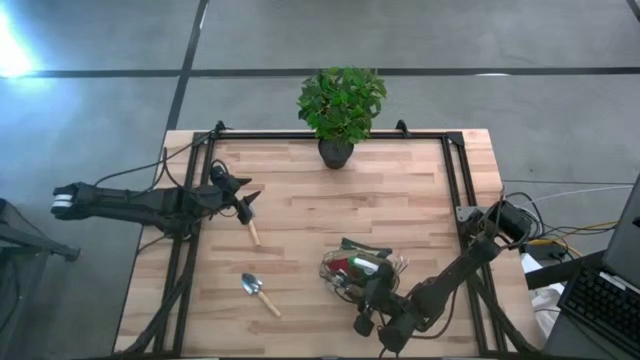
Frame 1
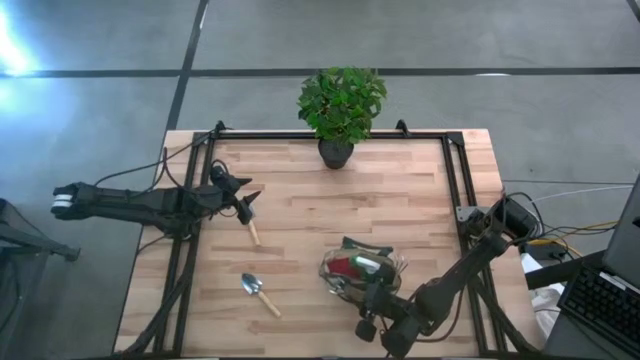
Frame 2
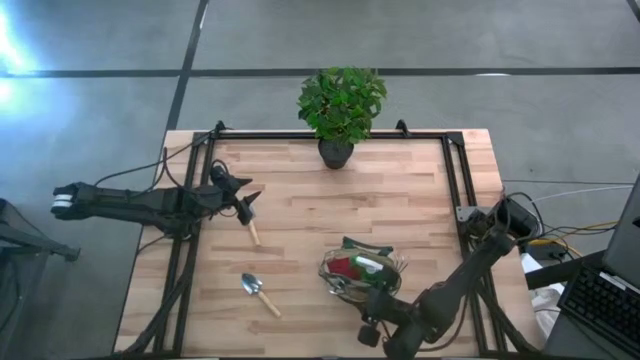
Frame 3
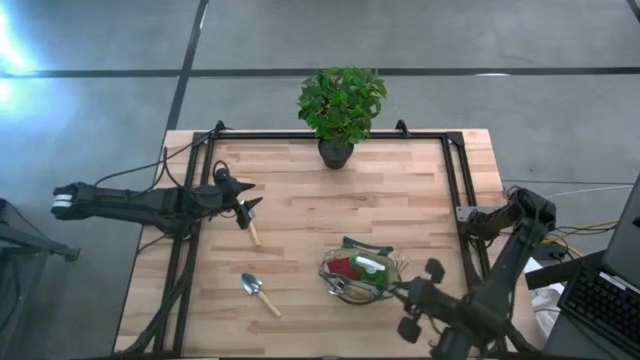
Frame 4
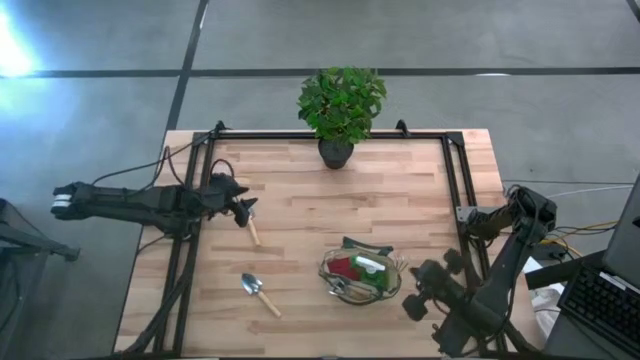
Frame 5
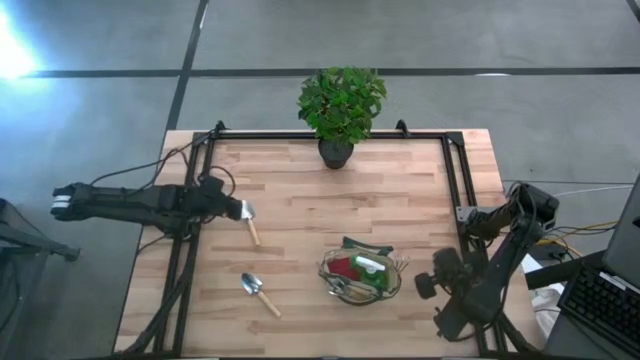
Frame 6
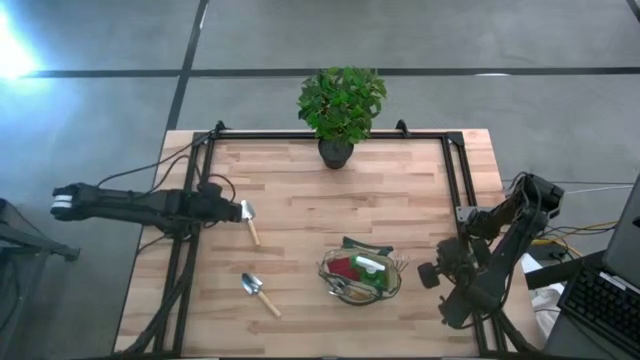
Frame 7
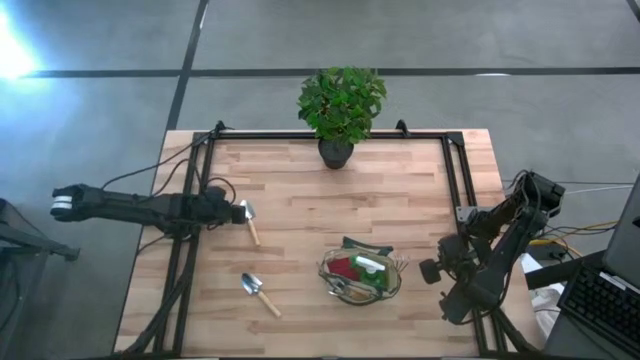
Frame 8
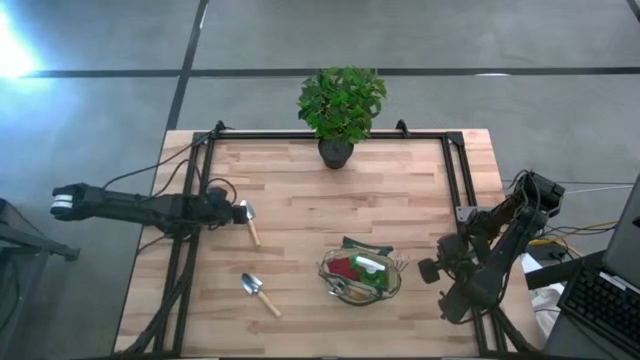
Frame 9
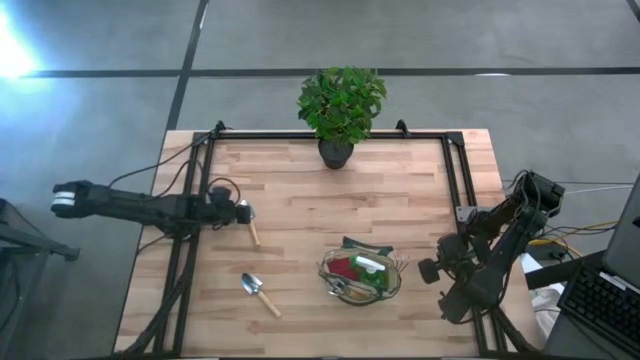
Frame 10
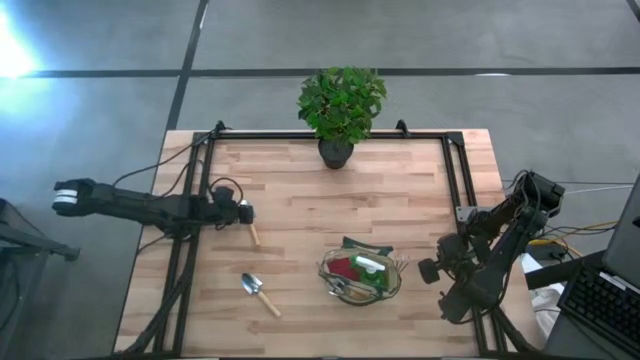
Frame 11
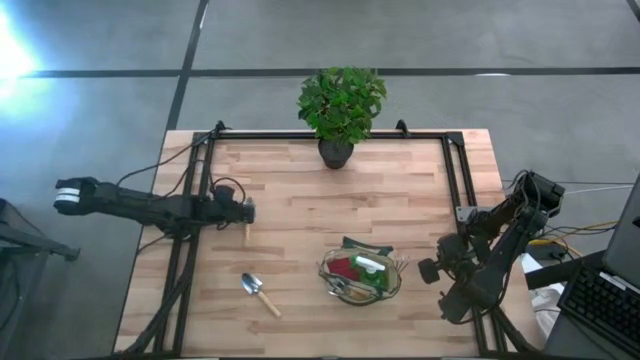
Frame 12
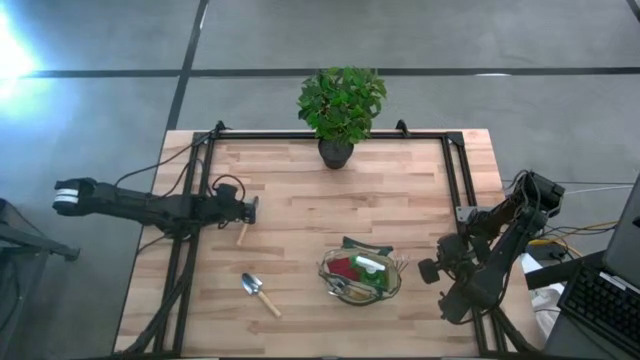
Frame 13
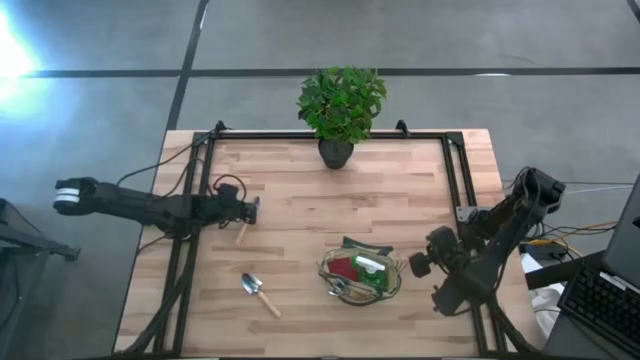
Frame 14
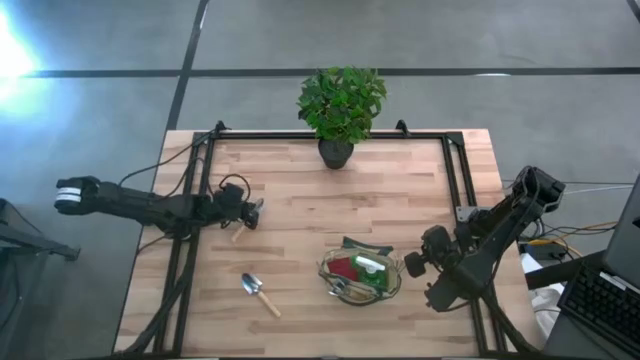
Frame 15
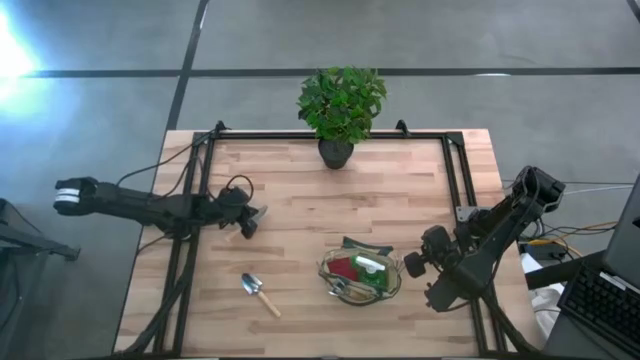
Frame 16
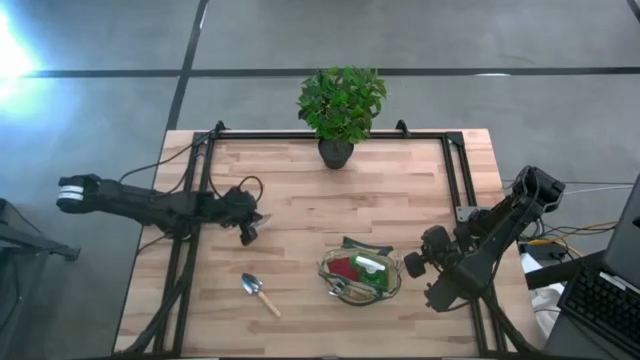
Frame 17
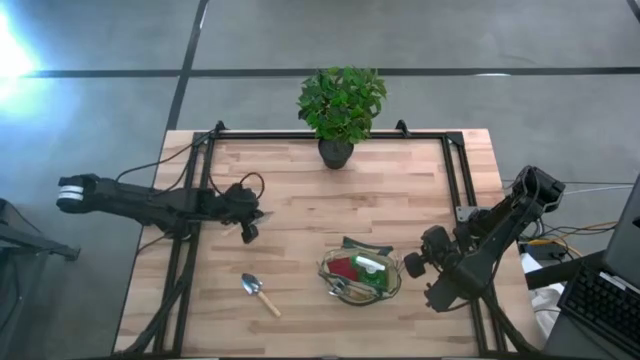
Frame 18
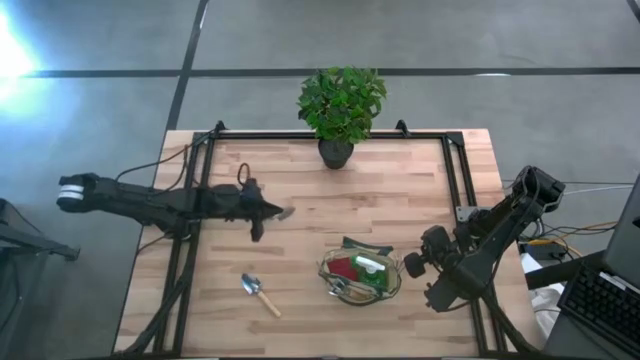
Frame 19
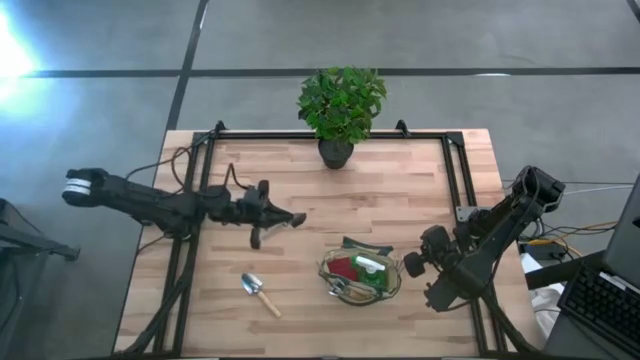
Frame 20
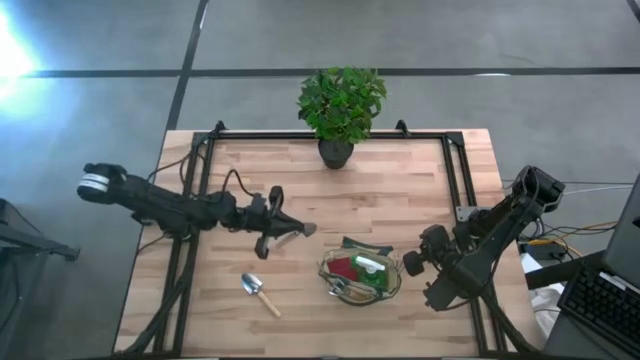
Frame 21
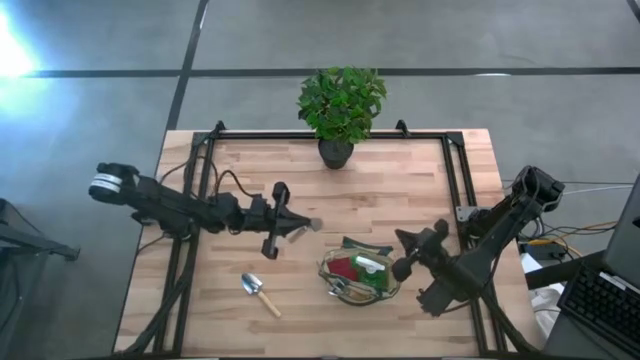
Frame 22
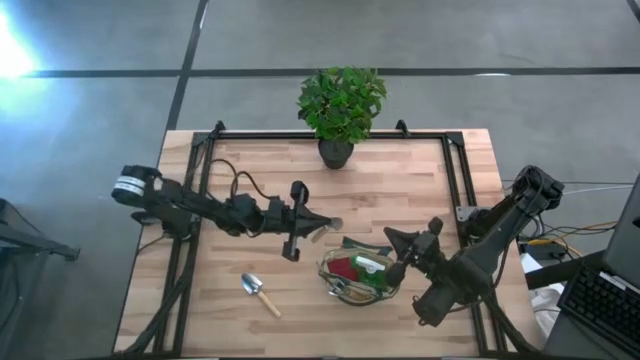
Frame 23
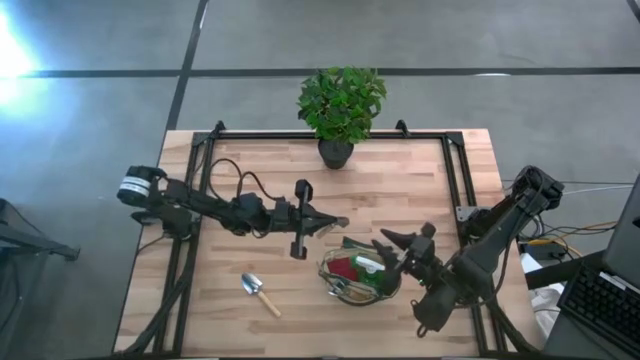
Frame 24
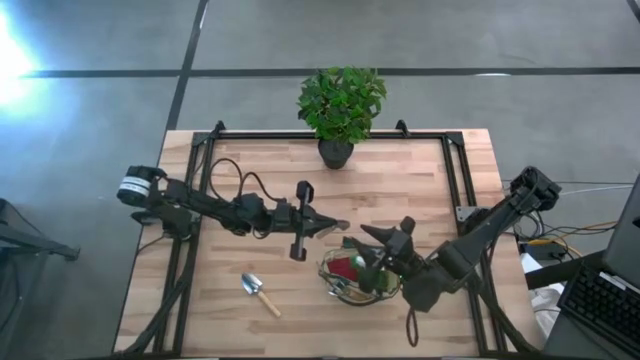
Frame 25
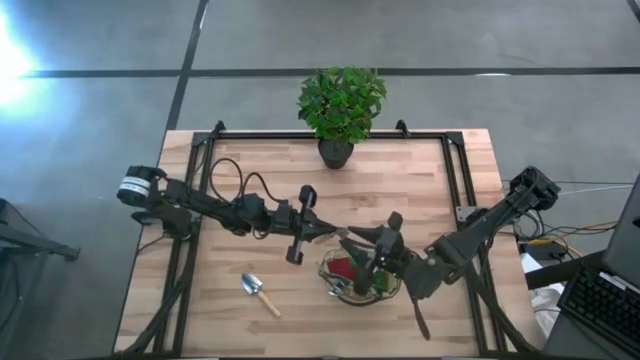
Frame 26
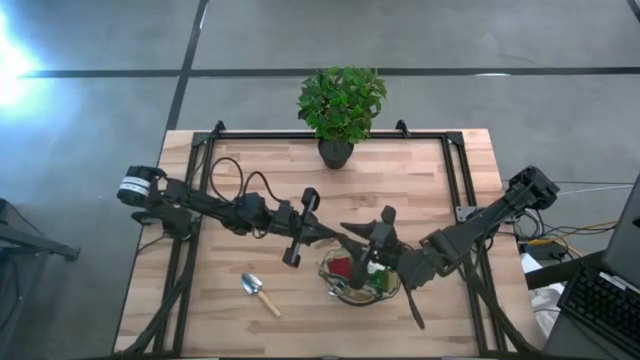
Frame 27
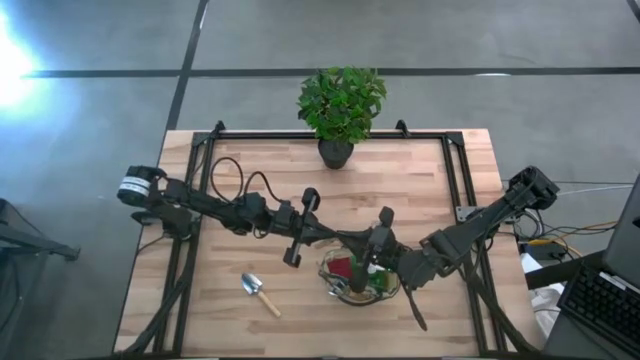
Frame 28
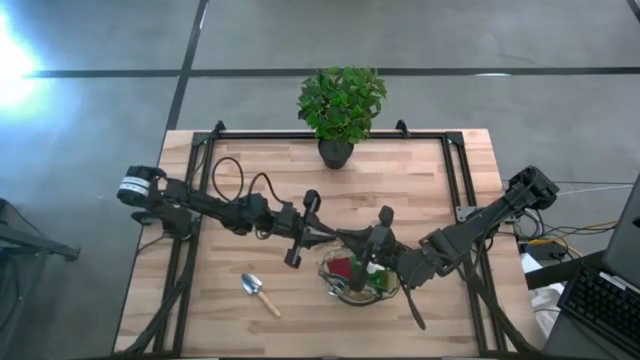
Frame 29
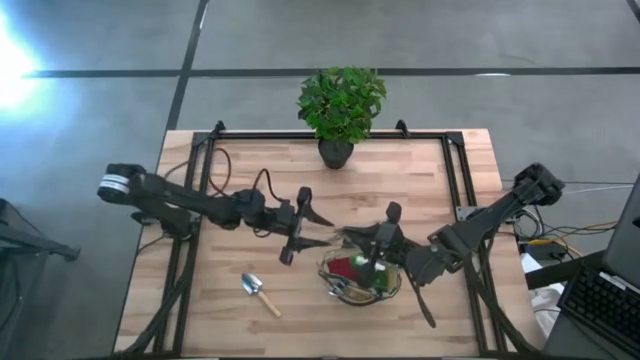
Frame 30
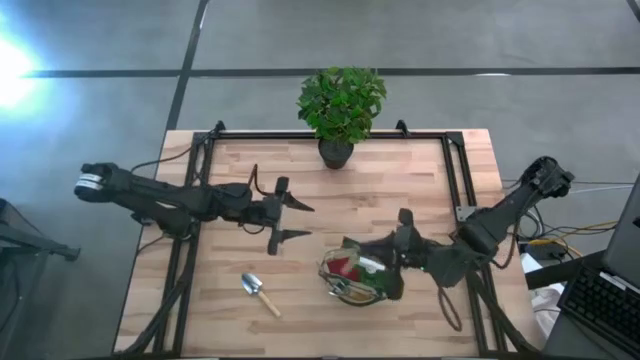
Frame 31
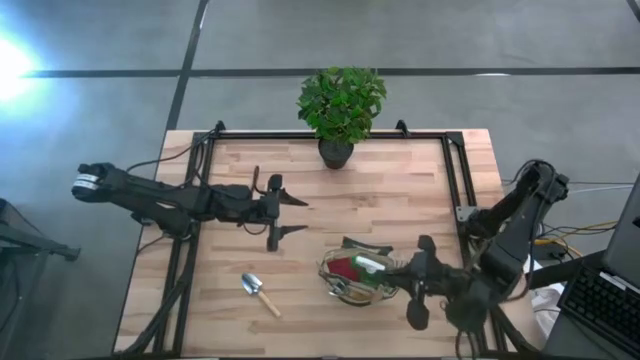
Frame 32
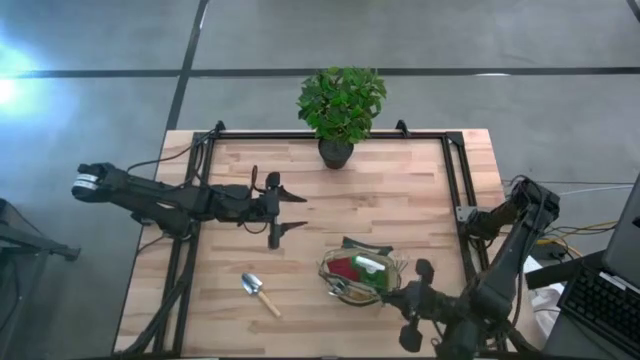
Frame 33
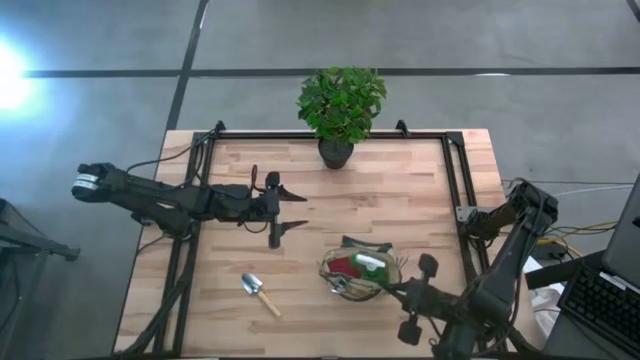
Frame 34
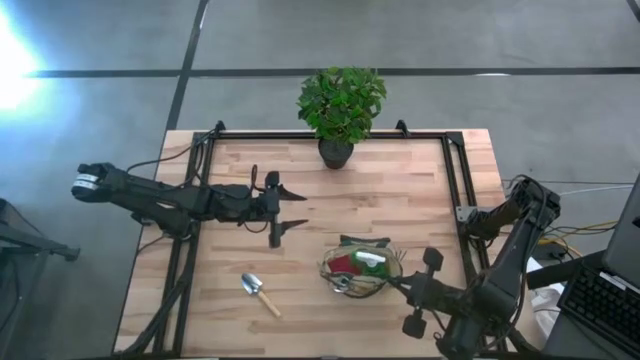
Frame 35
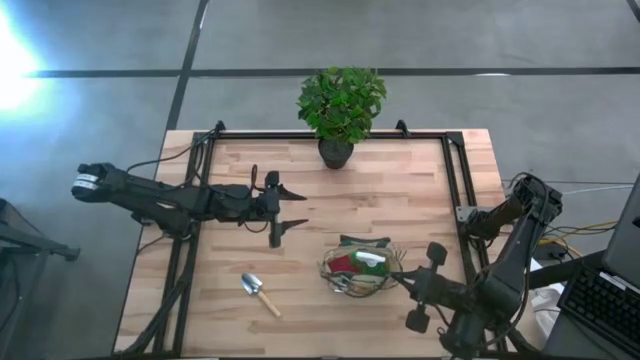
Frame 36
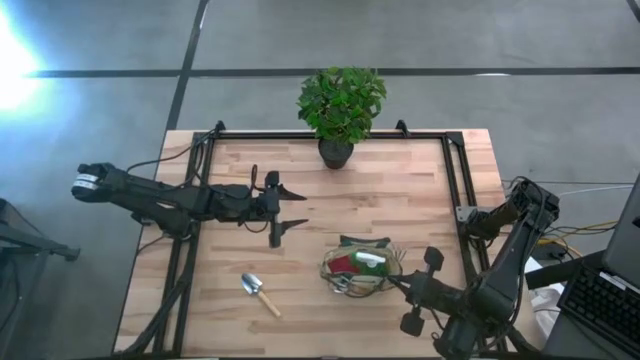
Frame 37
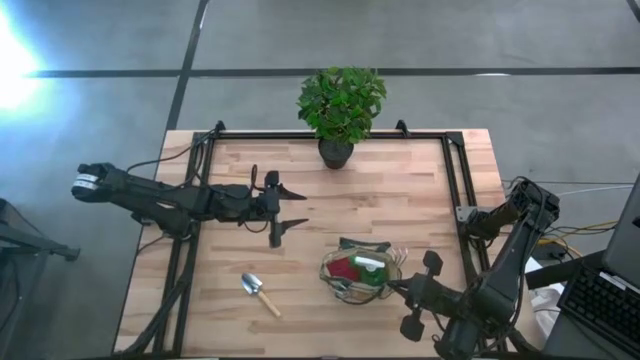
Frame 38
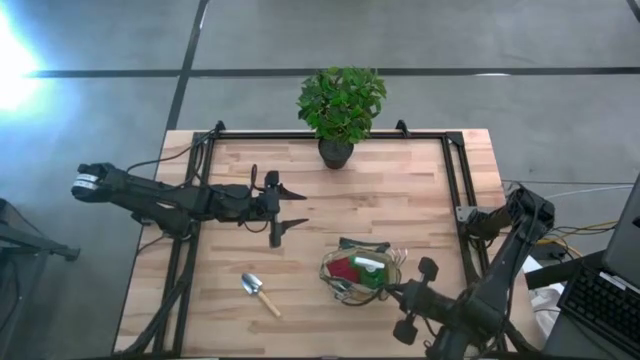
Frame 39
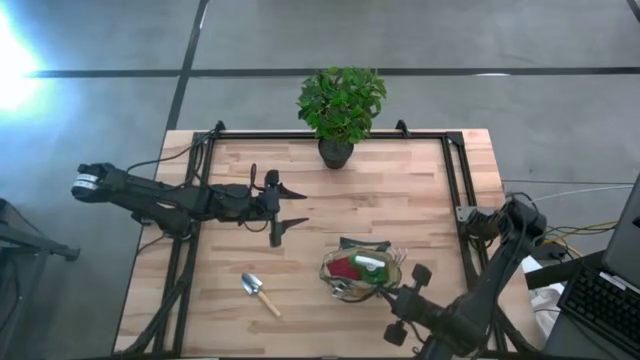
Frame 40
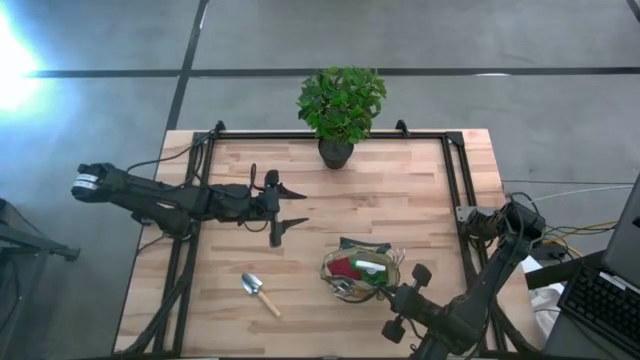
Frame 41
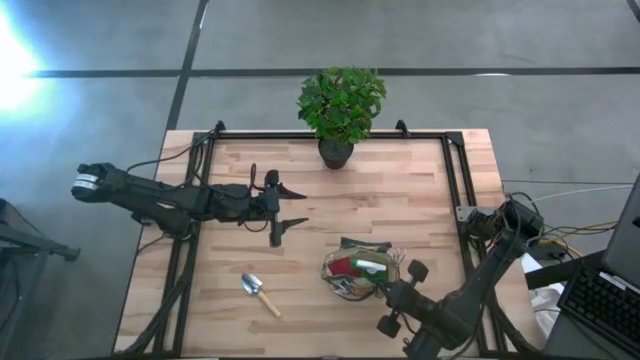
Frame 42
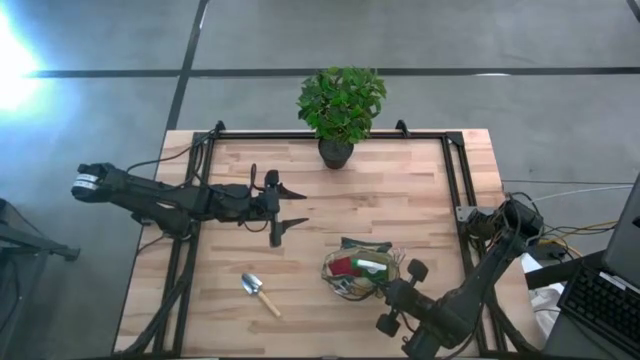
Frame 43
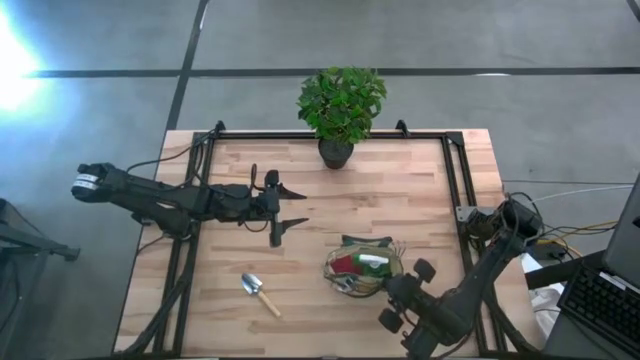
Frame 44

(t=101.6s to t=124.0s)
Task: Pick & Place Garden tools in Gardening bag
Put the top brown trowel into the green gardening bag
